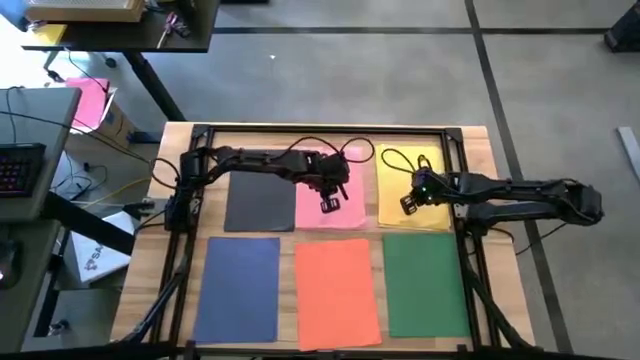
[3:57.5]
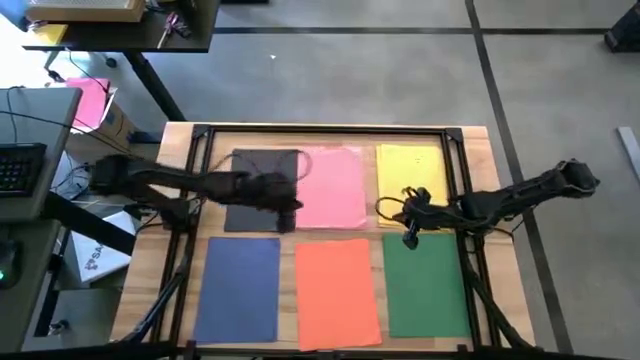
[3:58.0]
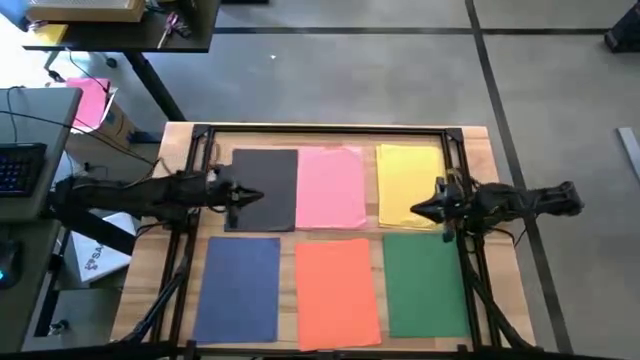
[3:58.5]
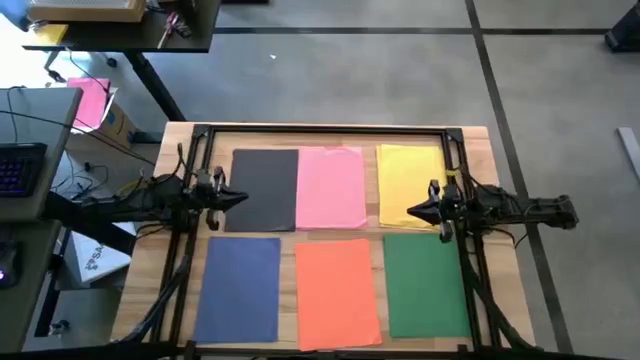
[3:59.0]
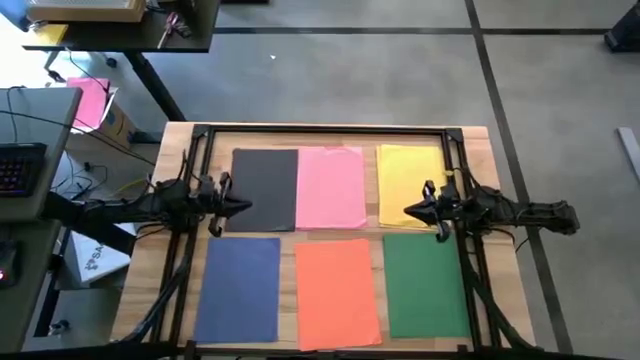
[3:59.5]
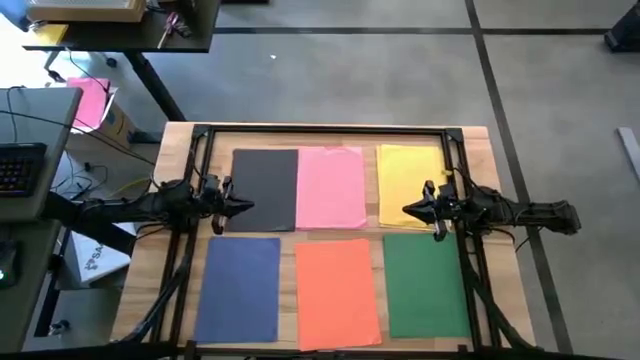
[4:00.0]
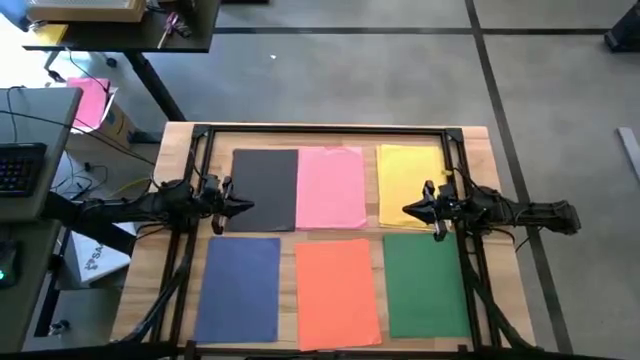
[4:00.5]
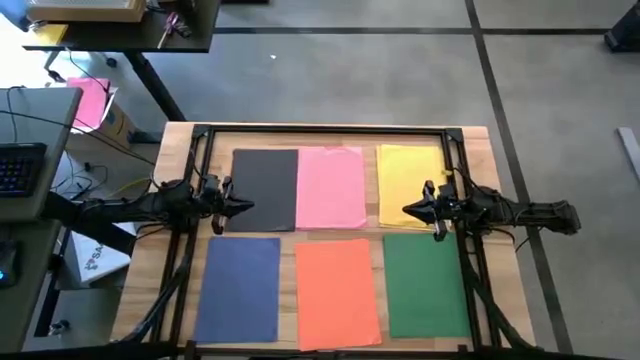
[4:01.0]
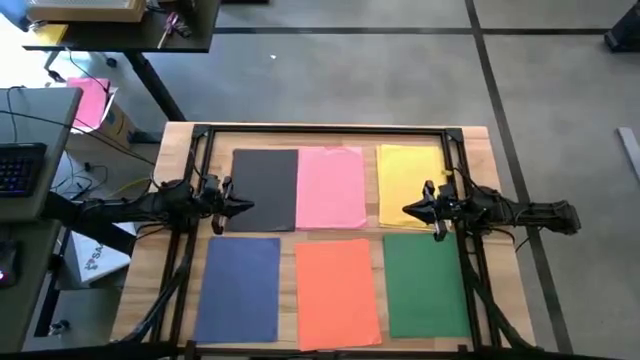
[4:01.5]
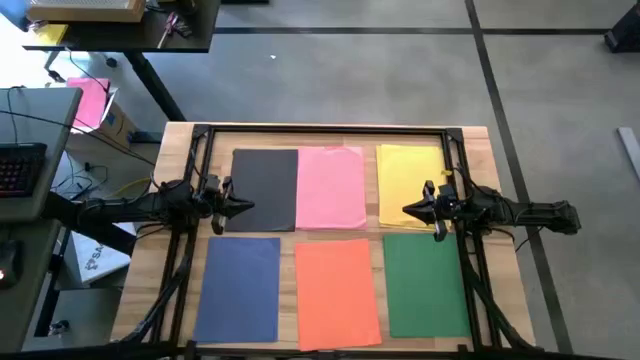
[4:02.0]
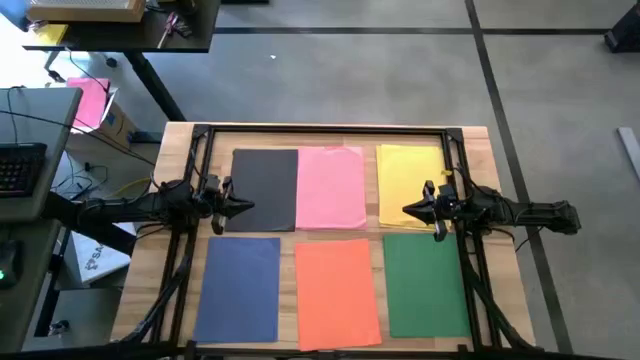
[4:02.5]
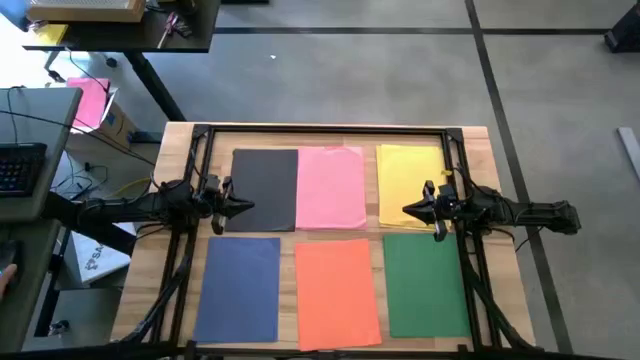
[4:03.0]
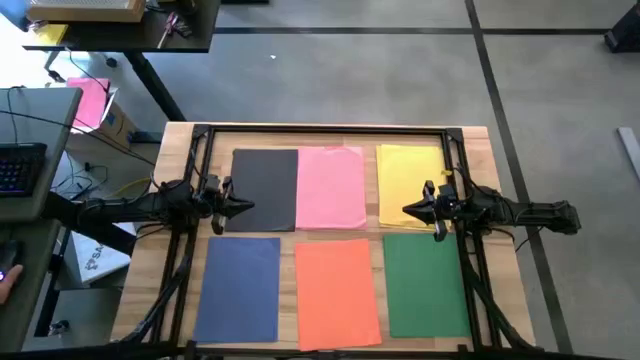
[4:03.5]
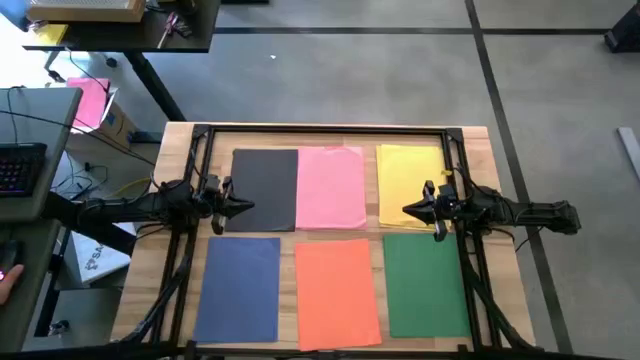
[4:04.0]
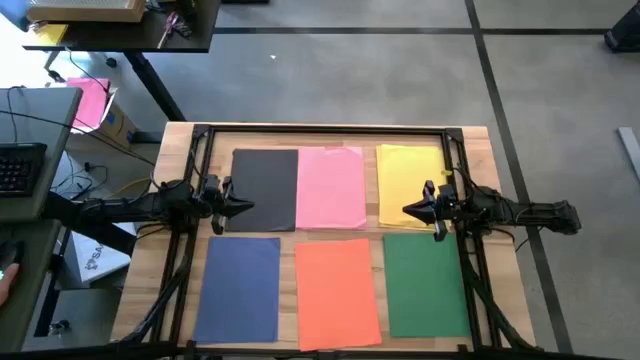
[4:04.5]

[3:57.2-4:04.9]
Task: Organize paper
Return to Home Position

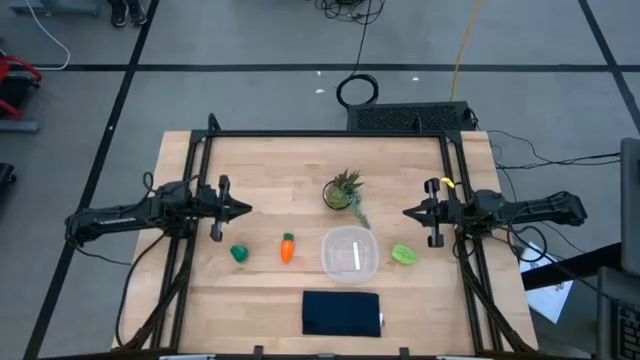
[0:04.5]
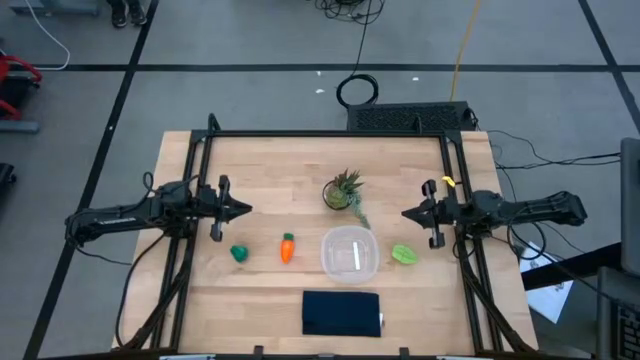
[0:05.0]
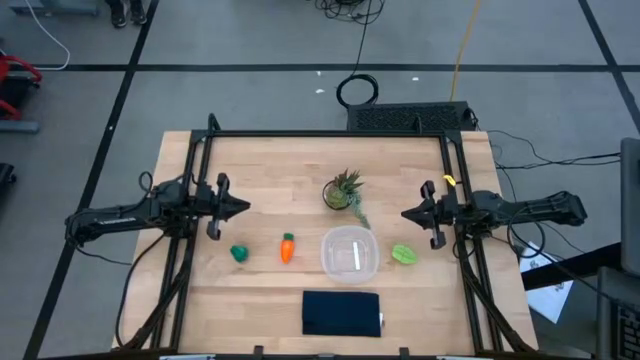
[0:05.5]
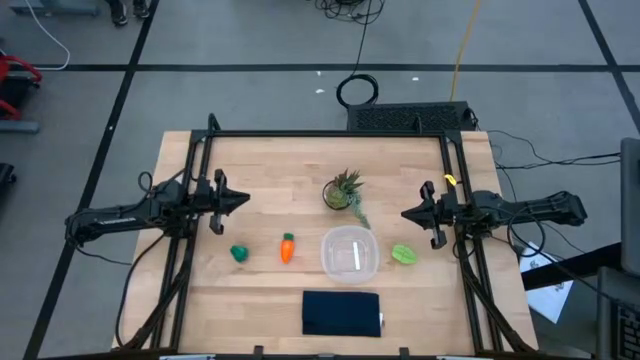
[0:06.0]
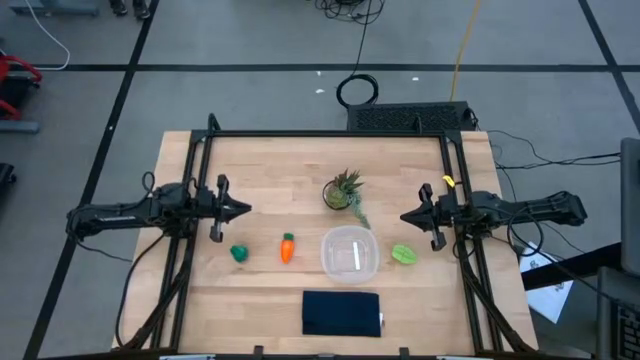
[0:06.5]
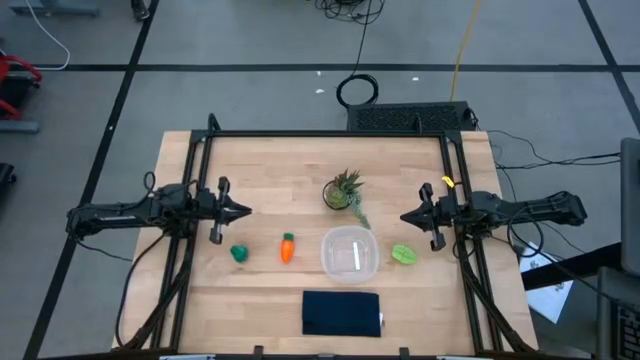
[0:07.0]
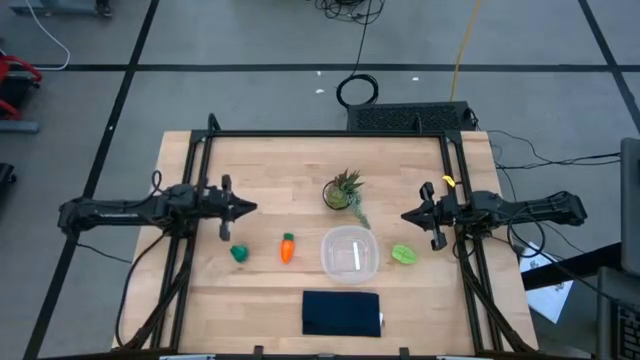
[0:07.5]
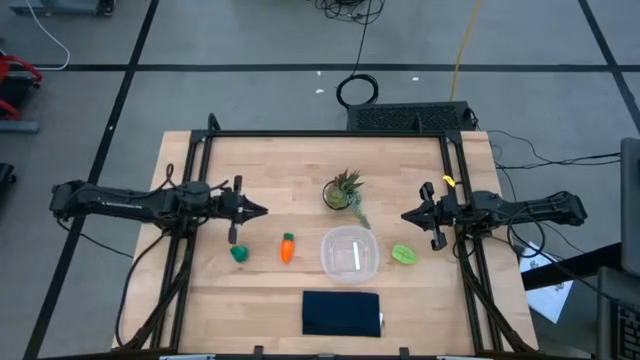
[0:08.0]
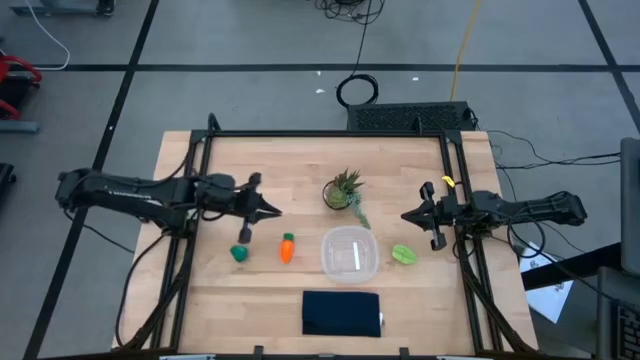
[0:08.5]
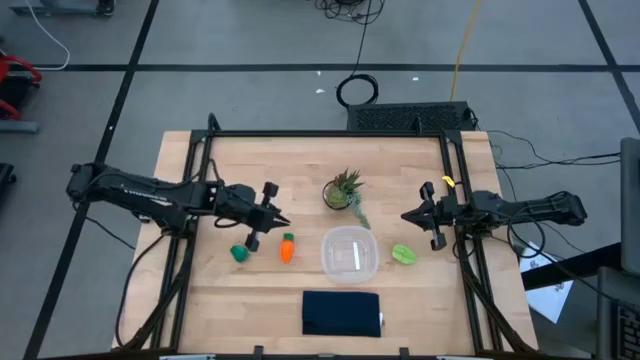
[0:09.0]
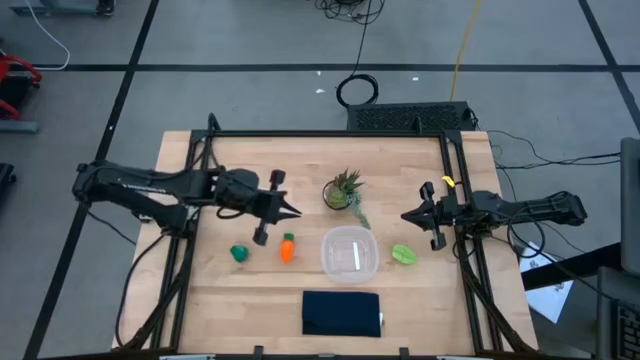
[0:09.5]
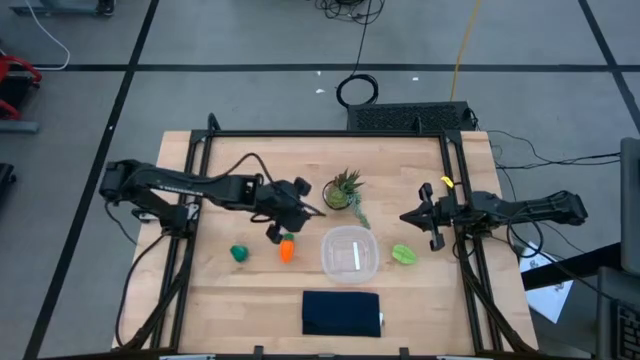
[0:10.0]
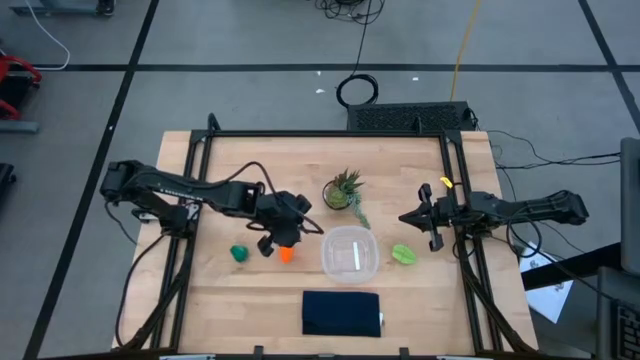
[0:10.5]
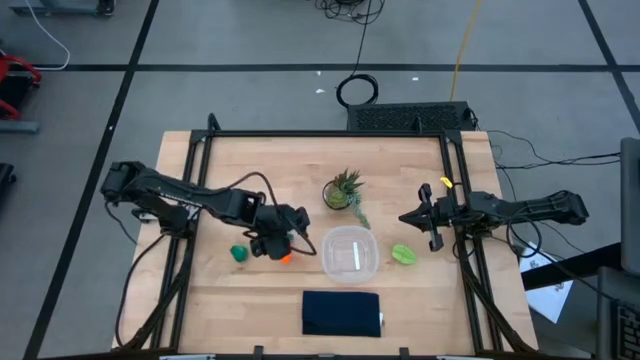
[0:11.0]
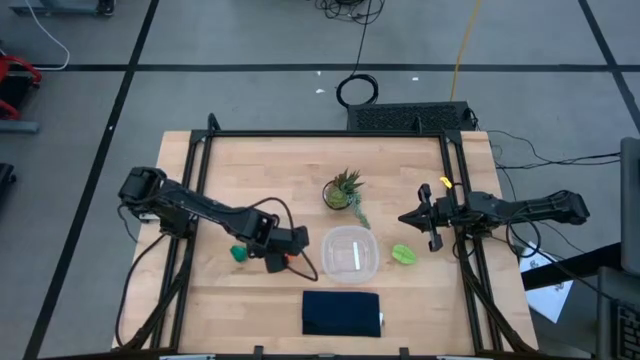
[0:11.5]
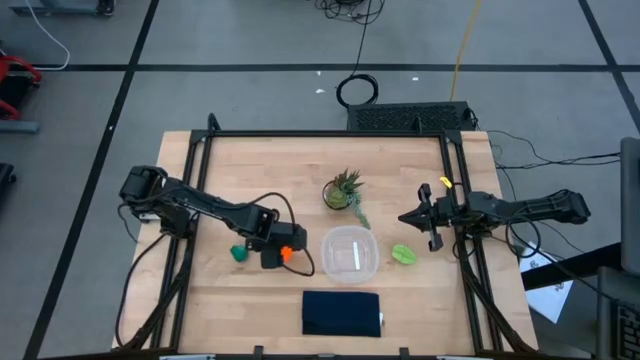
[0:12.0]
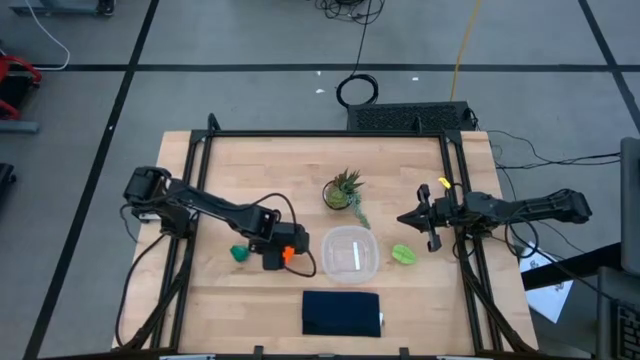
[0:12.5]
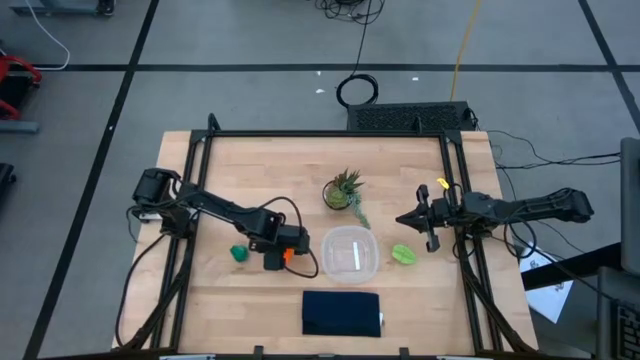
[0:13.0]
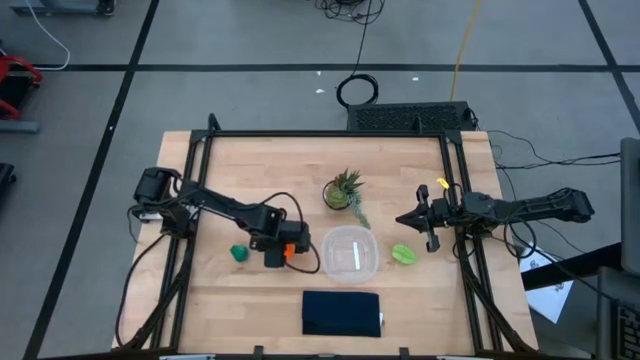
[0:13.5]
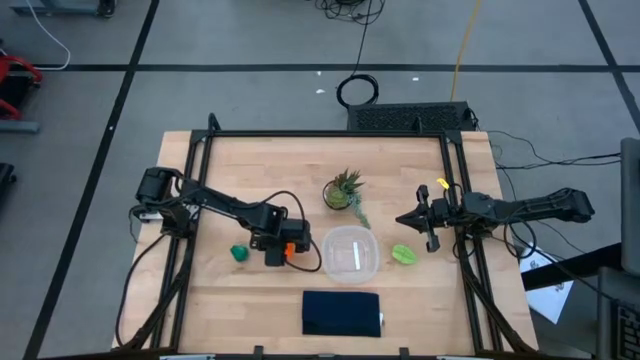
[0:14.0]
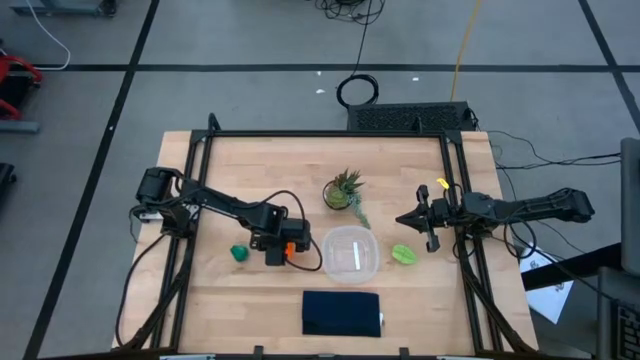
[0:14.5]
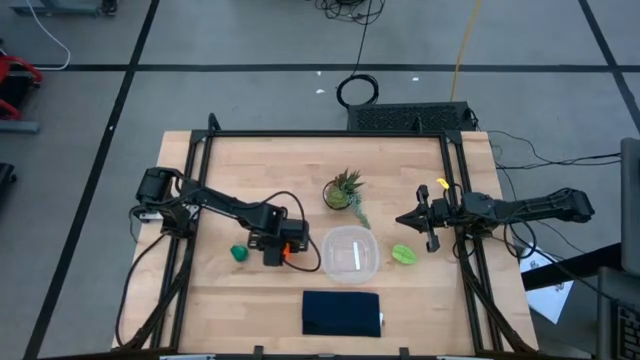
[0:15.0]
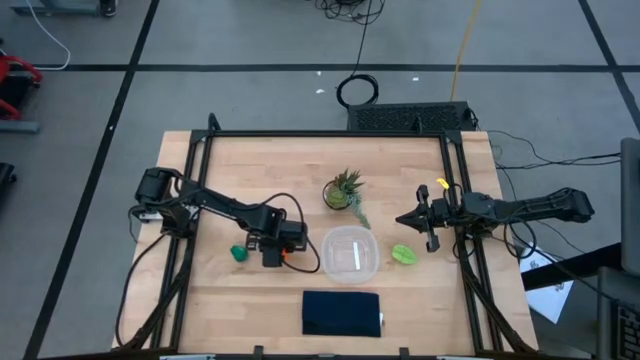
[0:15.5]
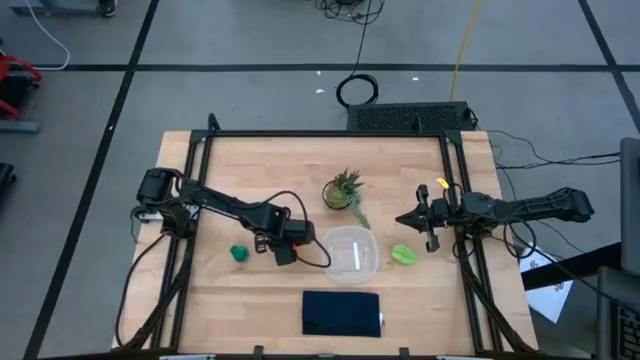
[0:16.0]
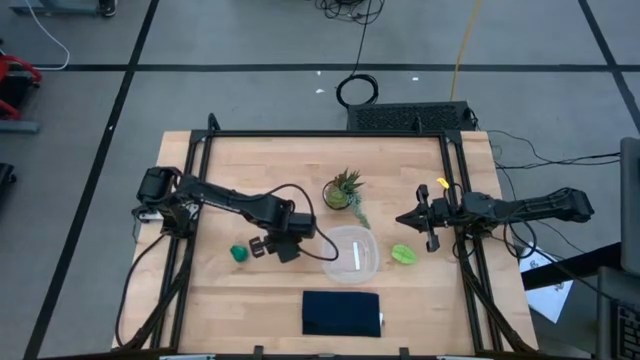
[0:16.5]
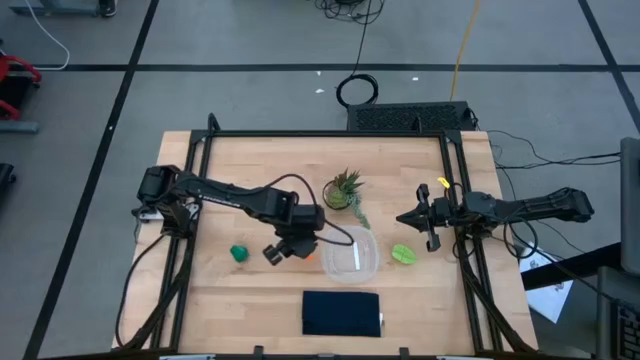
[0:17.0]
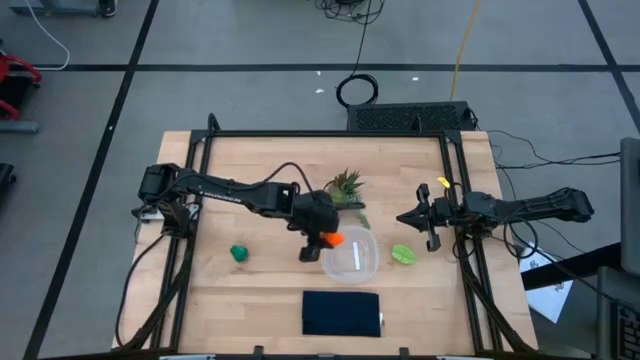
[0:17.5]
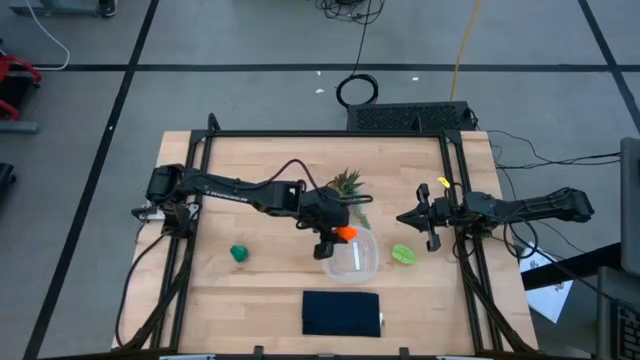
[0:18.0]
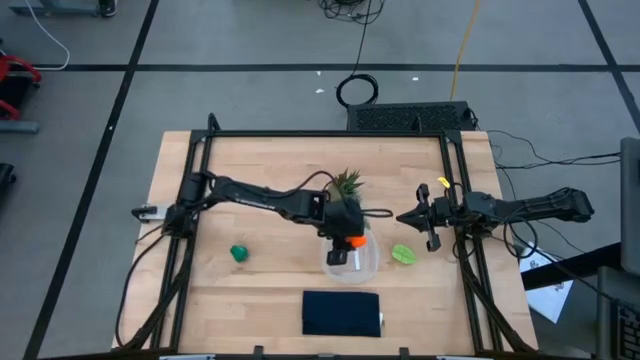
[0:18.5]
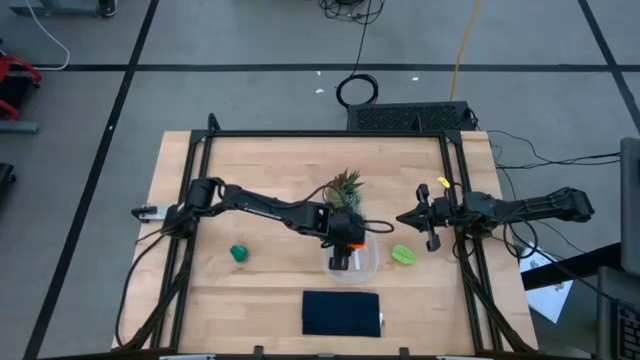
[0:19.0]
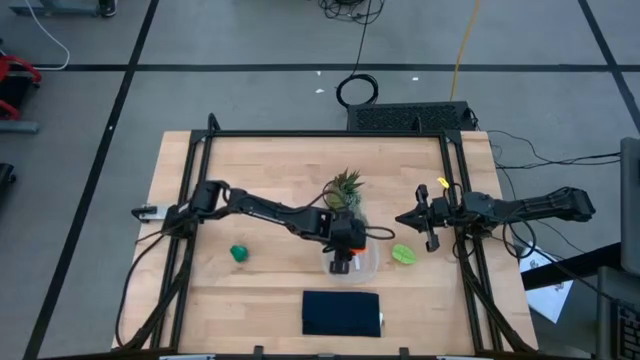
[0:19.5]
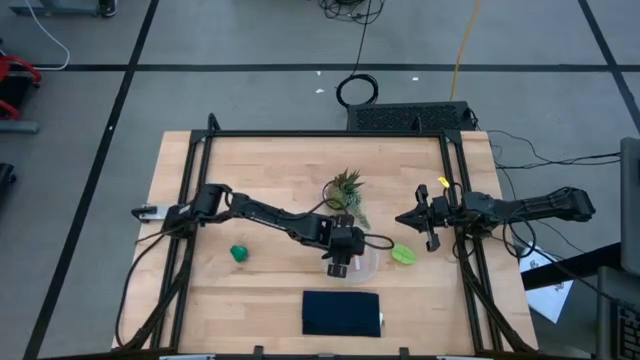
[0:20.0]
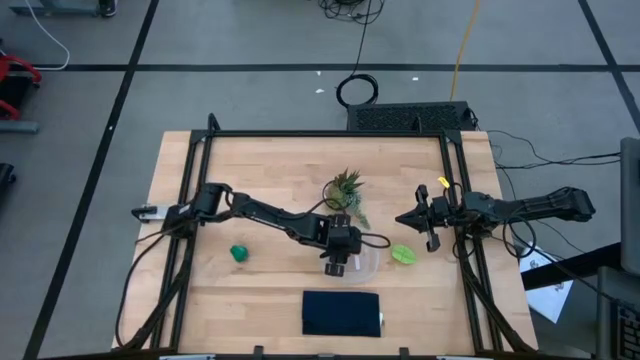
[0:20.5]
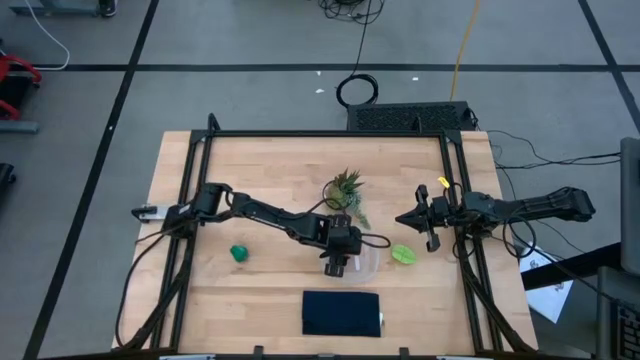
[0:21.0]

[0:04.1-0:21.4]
Task: Pick and placing Produce into tupperware
Put the orange carrot into the transparent bin
